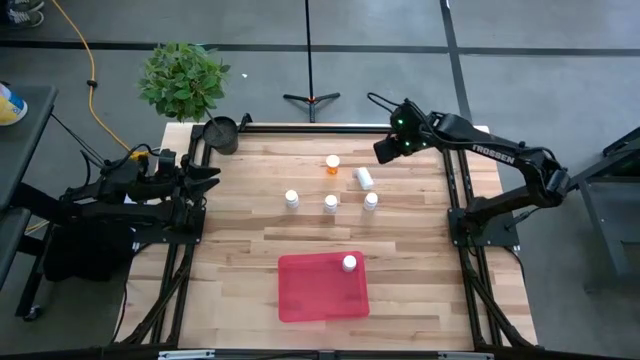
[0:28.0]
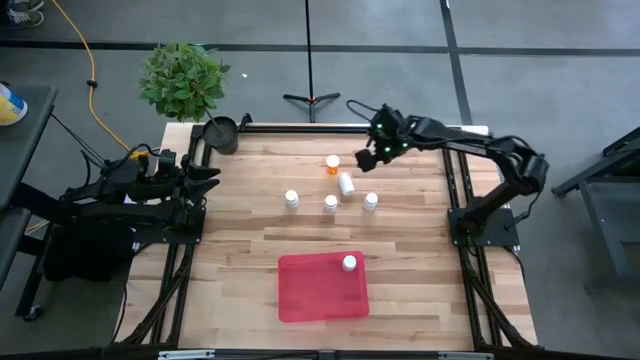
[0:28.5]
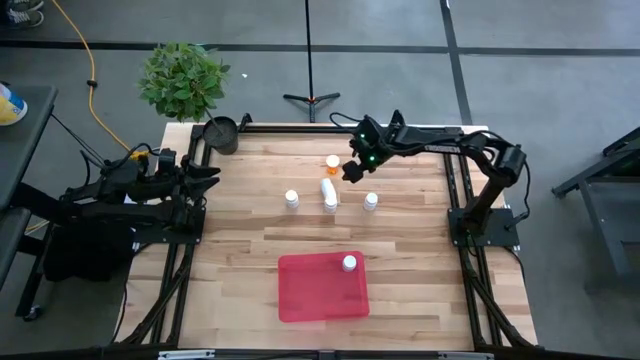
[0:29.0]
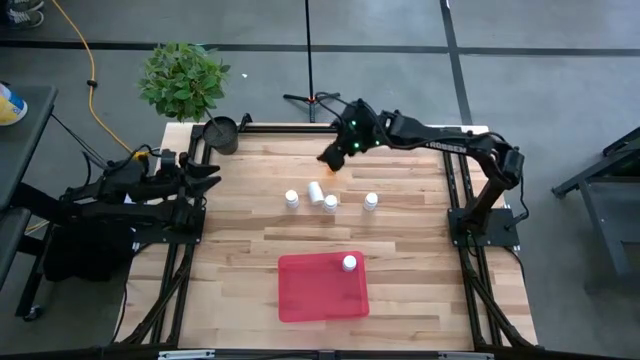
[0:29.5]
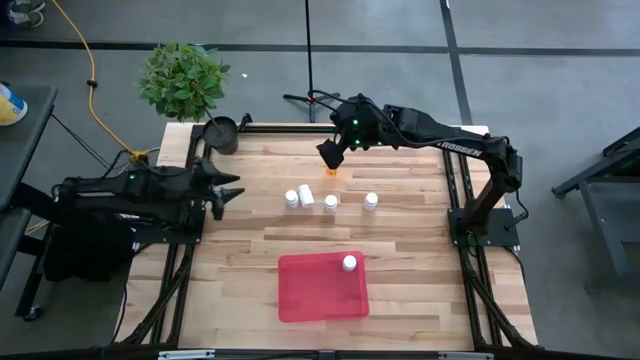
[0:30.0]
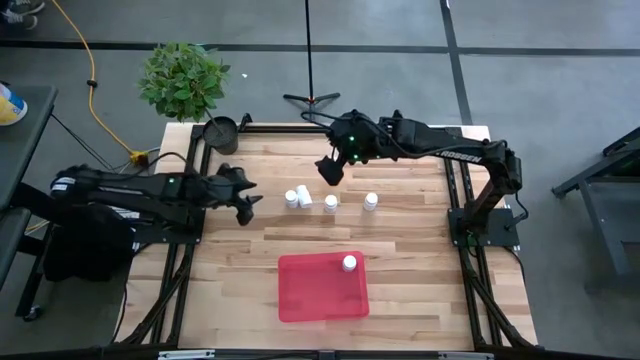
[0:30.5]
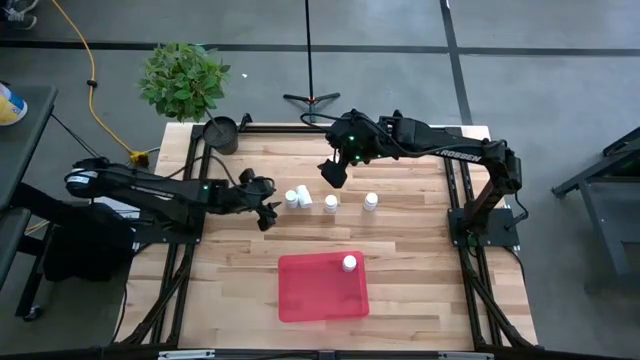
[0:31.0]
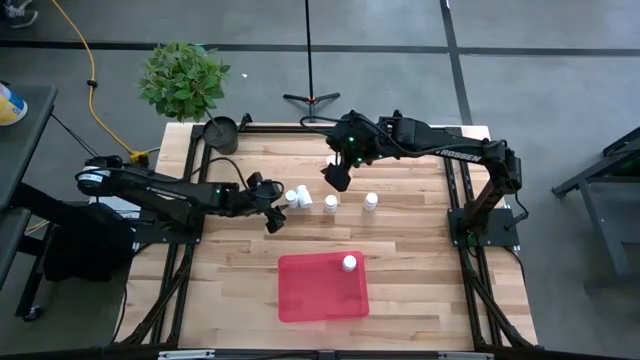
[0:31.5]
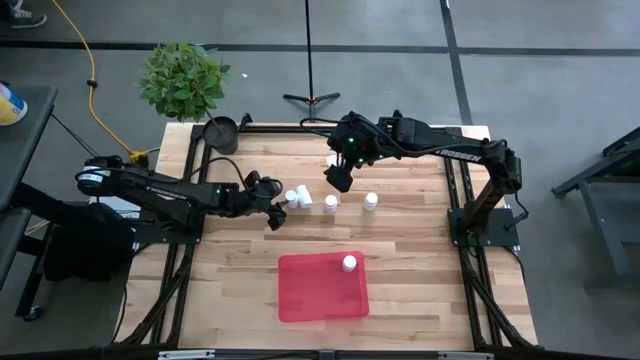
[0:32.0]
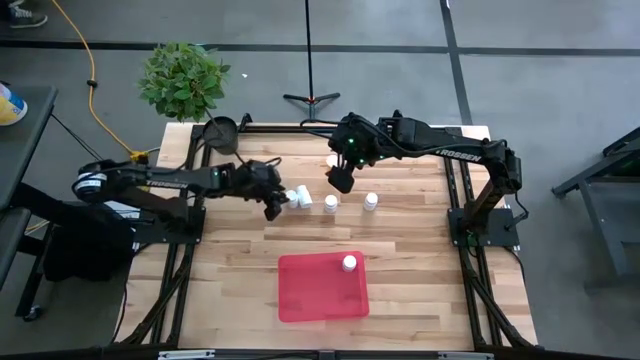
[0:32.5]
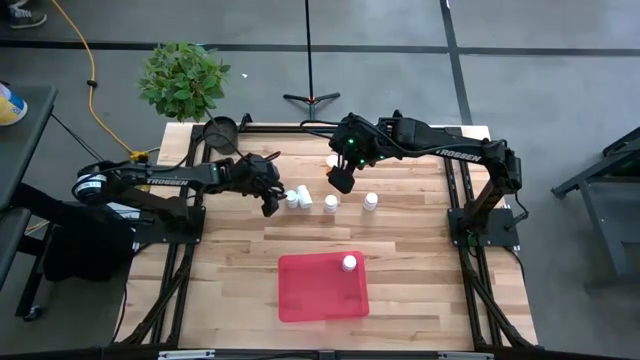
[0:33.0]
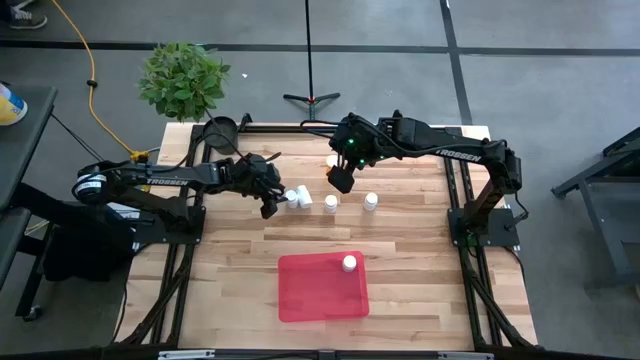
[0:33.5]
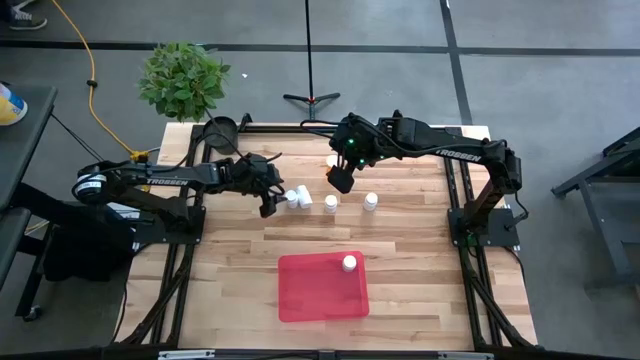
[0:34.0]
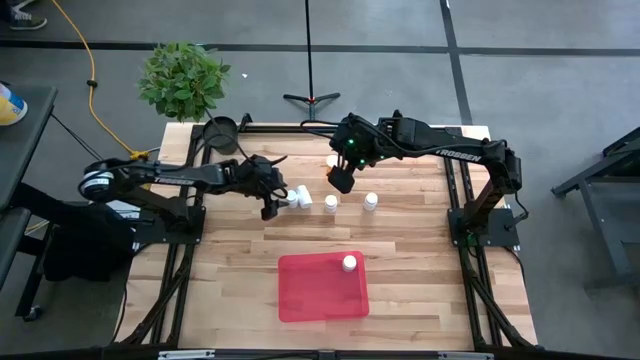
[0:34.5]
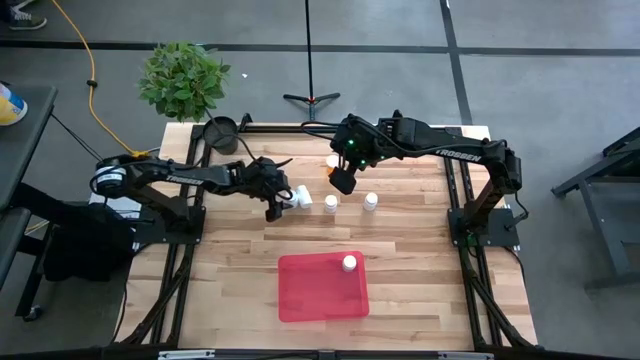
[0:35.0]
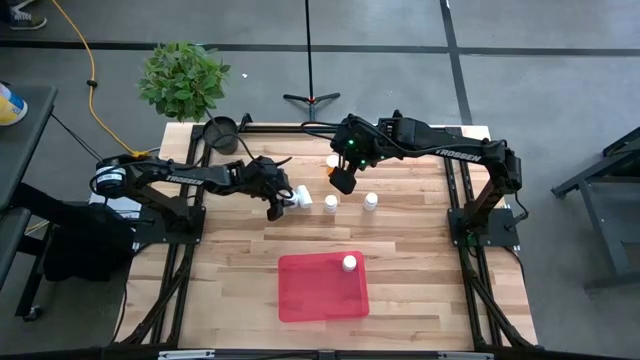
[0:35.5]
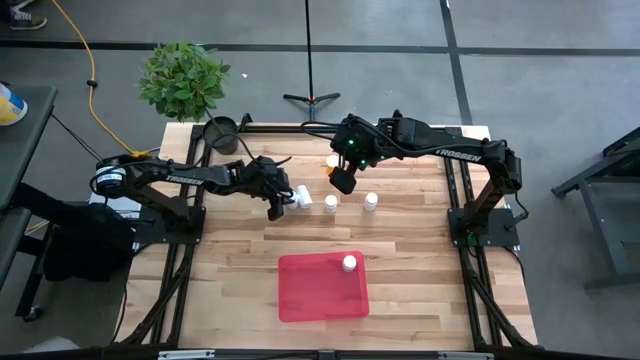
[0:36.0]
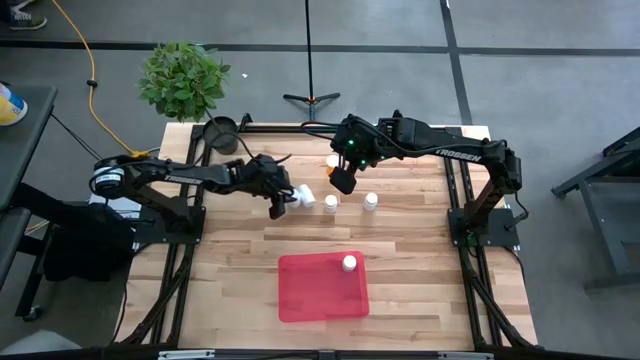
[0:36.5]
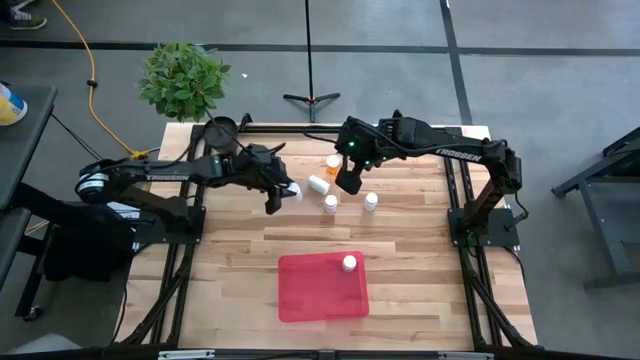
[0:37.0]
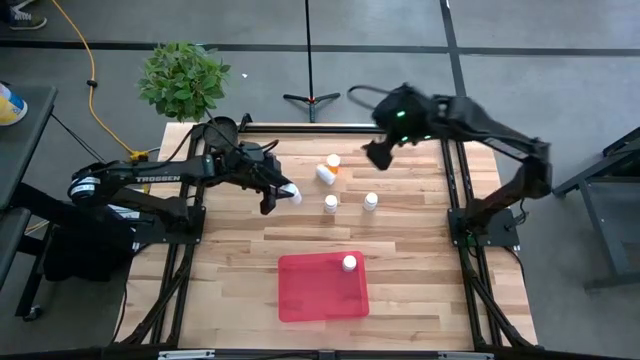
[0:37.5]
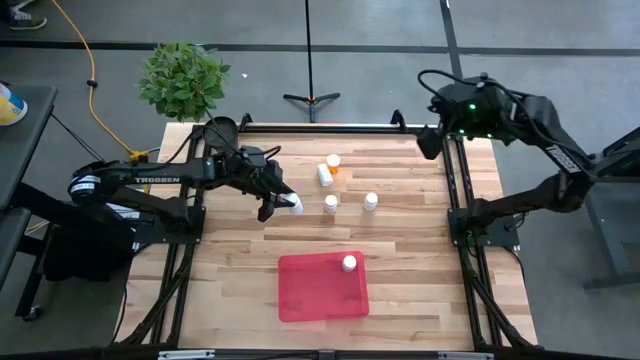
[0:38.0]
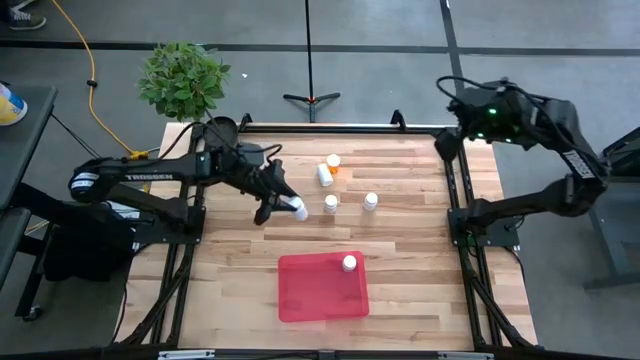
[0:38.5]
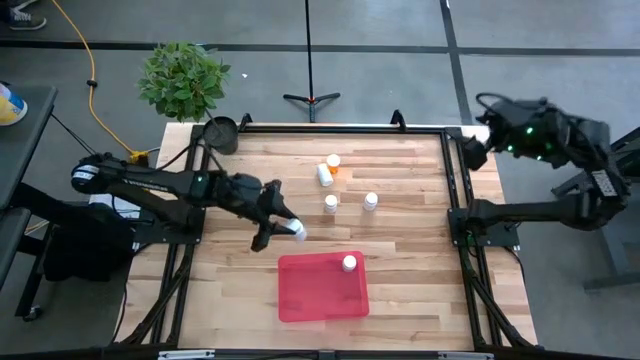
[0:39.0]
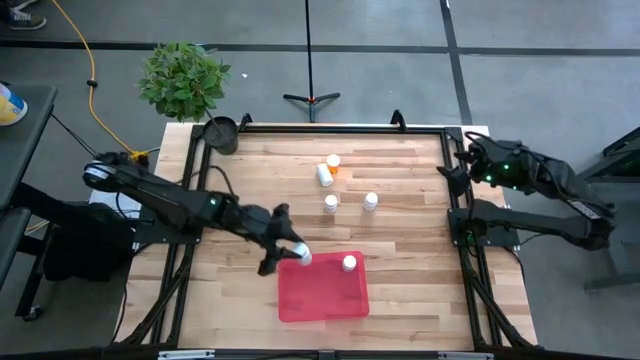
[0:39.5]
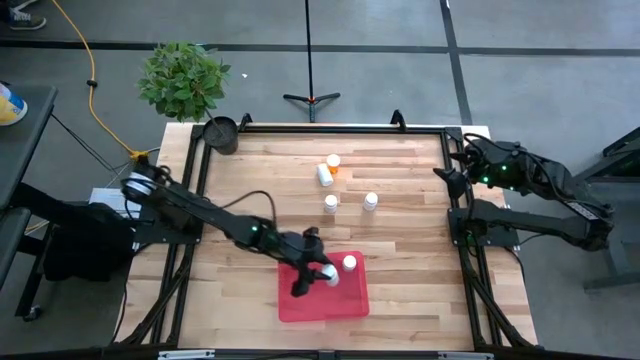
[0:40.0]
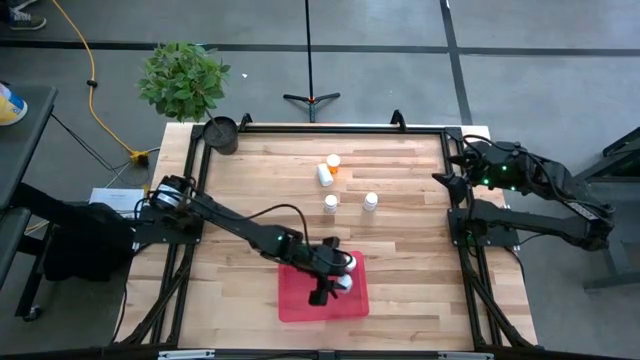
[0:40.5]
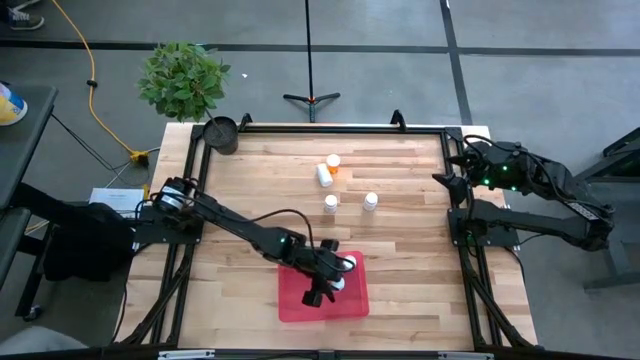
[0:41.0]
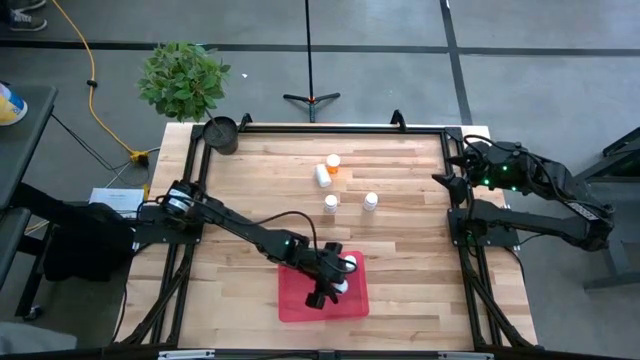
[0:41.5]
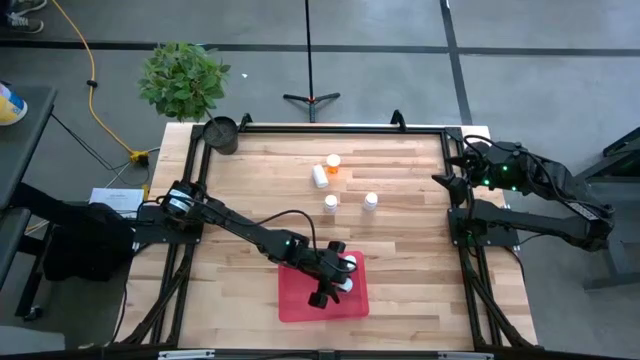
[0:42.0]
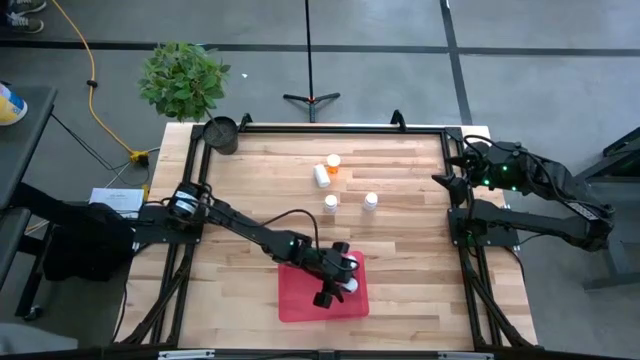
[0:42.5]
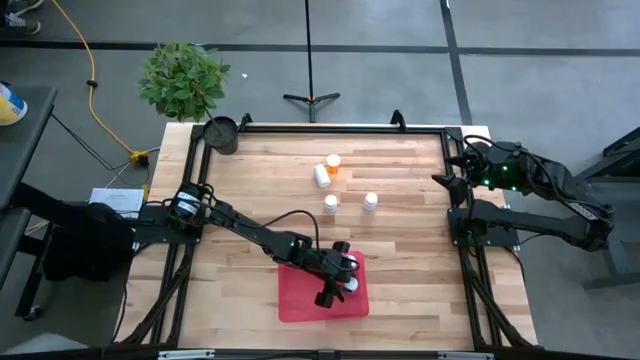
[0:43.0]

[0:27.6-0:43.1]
Task: Pick and place pill bottles into a basket
Put the white medicine bottle into the red container

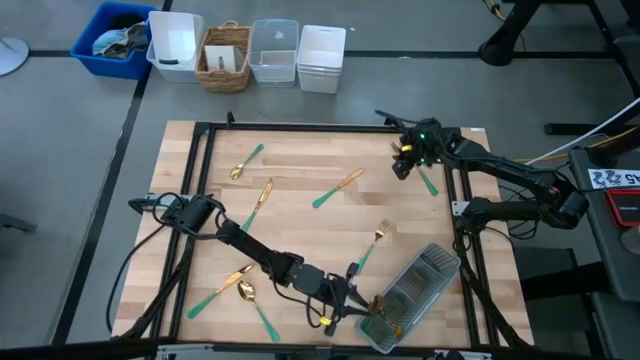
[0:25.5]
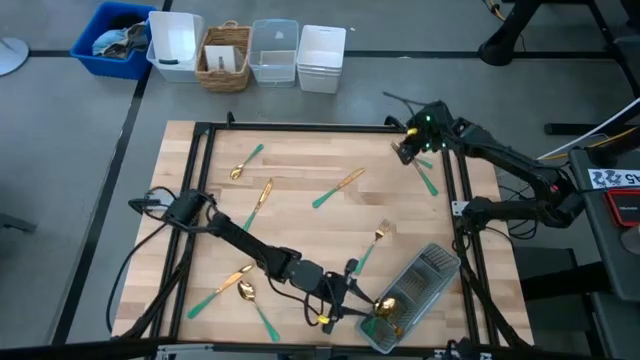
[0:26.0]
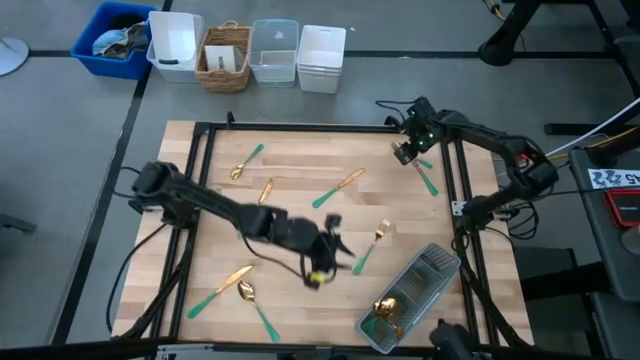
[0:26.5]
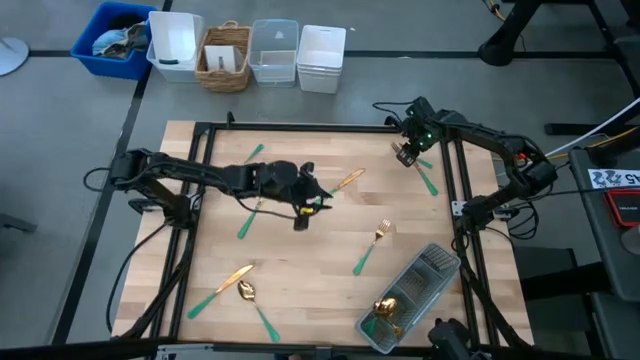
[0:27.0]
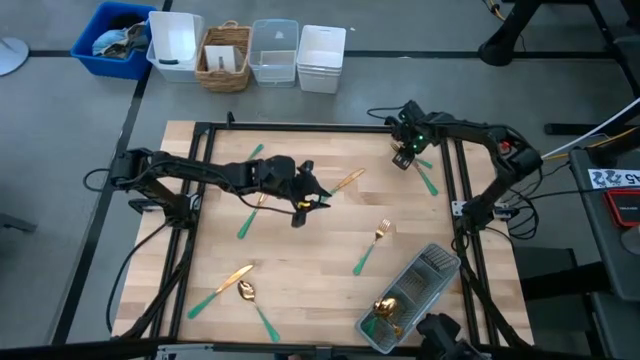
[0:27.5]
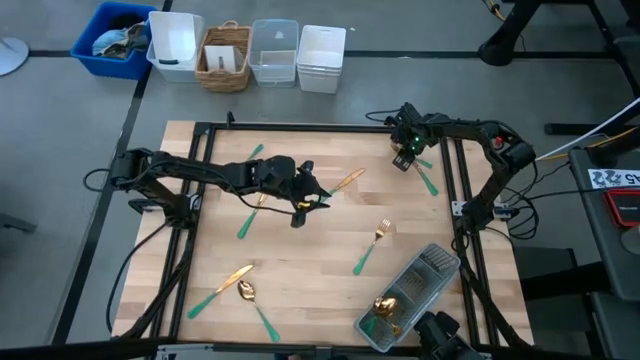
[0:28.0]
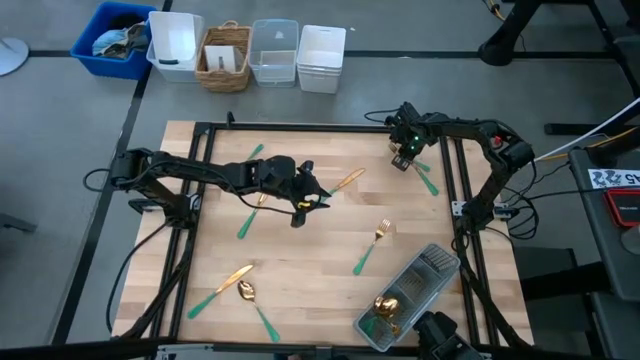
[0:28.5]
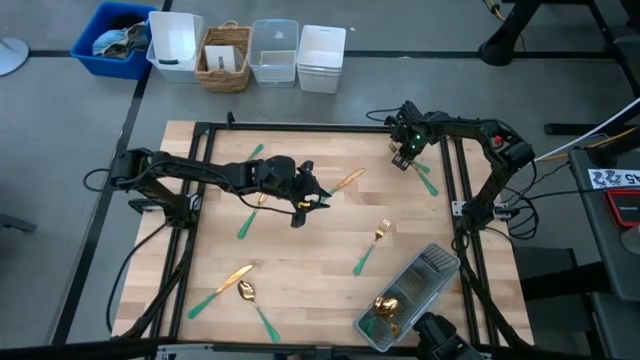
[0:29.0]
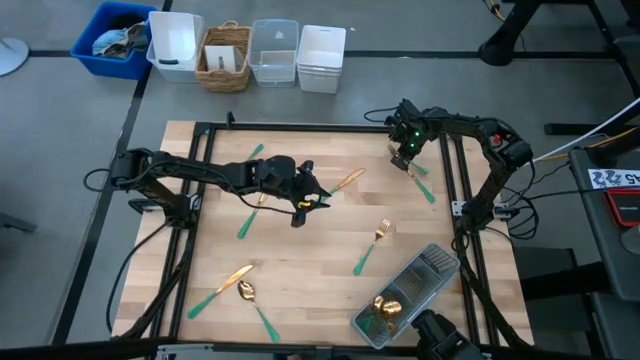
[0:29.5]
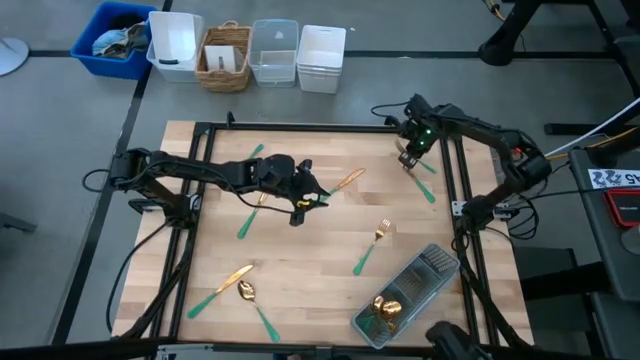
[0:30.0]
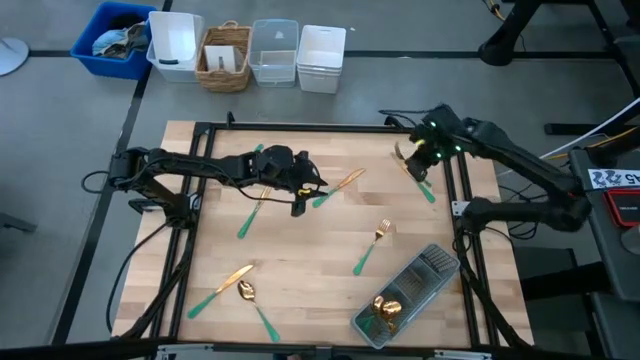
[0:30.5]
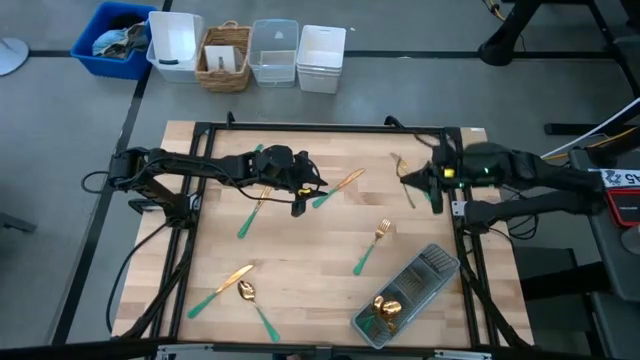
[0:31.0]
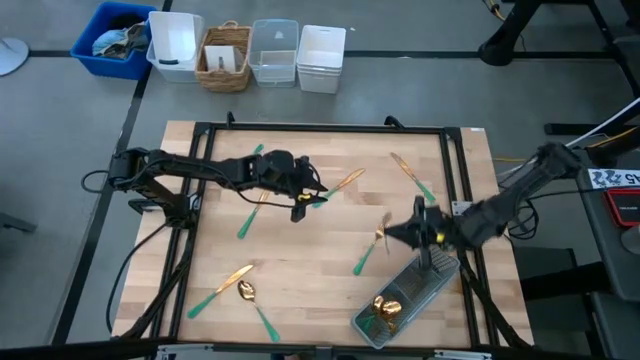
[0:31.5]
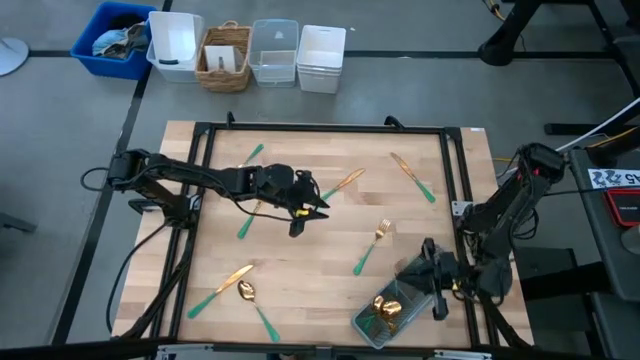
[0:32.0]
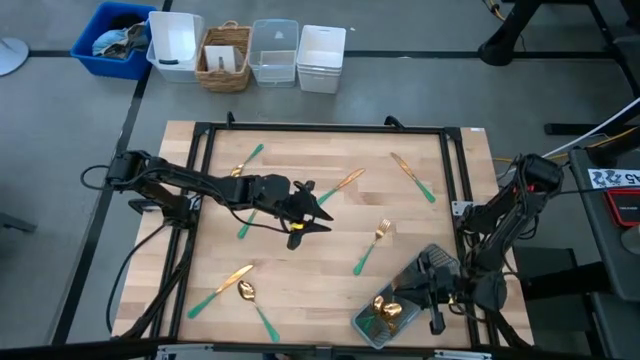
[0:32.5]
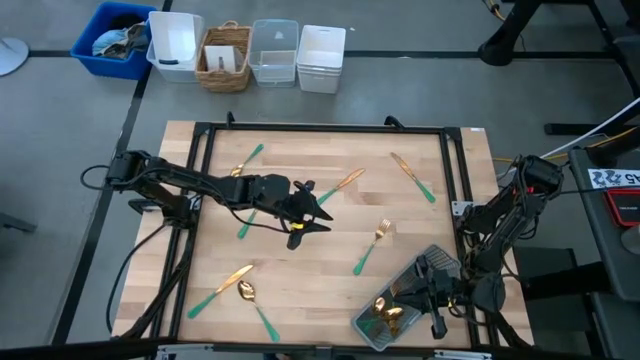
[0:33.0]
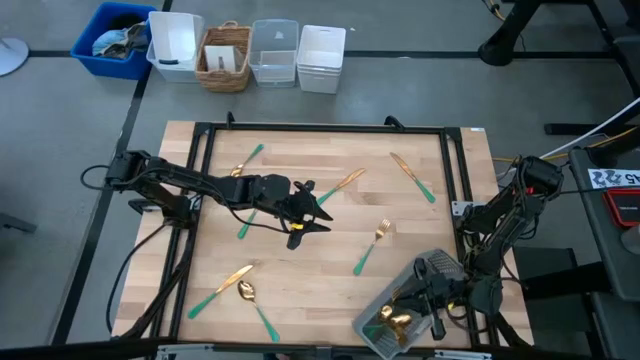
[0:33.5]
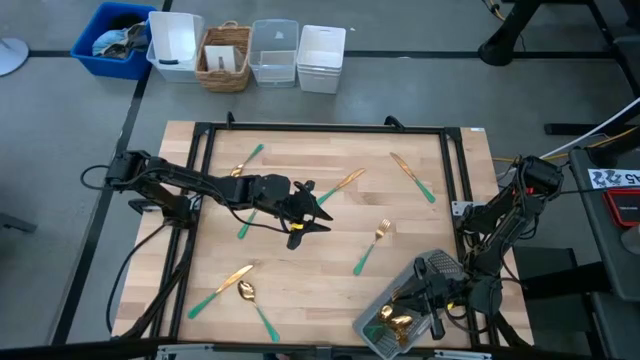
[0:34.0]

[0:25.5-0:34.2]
Task: Sort silverware
Put the top fork into the utensil organizer
